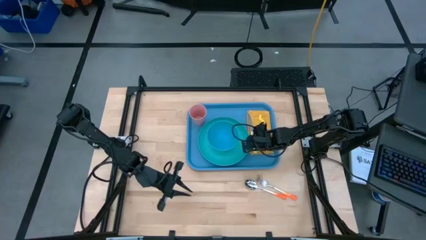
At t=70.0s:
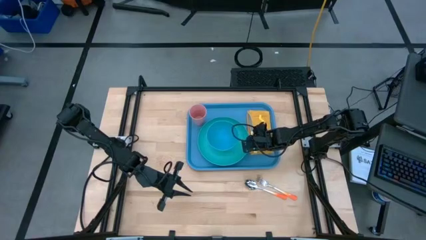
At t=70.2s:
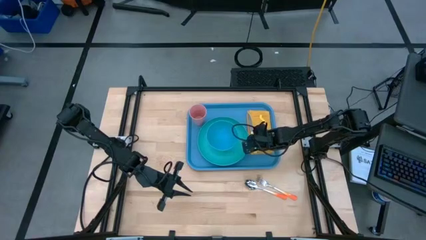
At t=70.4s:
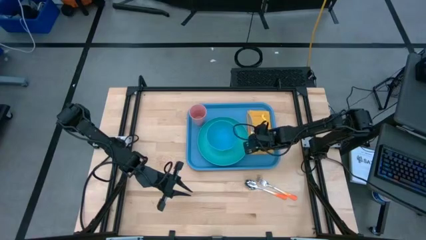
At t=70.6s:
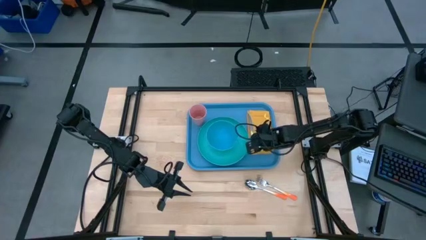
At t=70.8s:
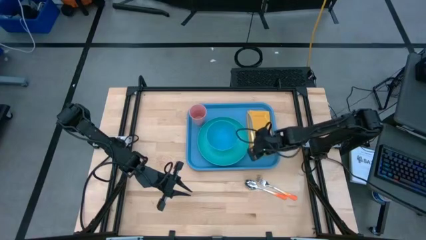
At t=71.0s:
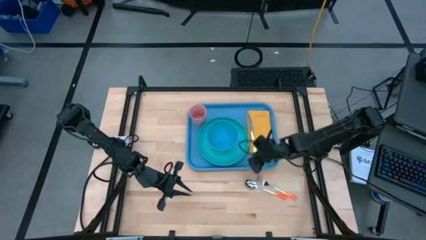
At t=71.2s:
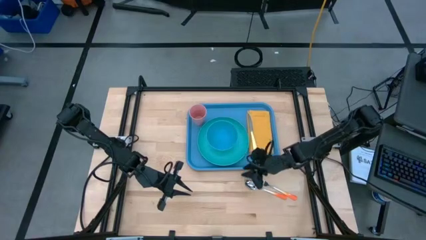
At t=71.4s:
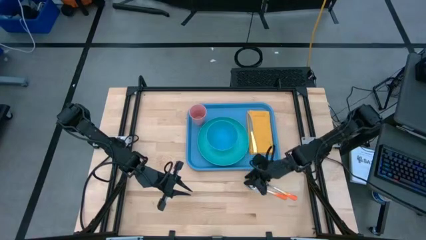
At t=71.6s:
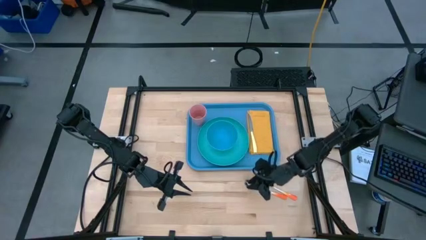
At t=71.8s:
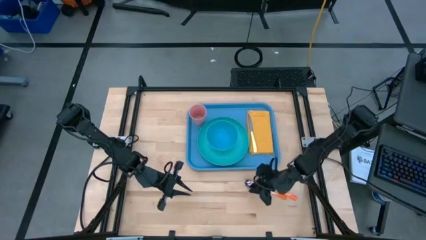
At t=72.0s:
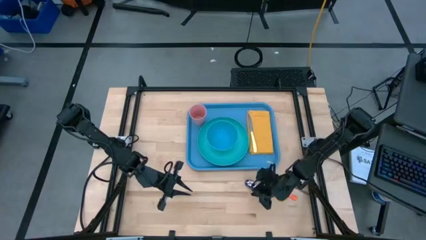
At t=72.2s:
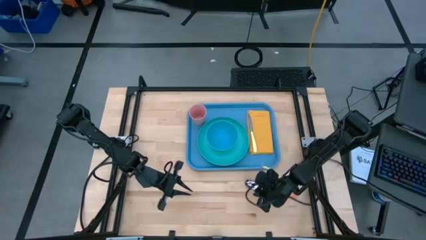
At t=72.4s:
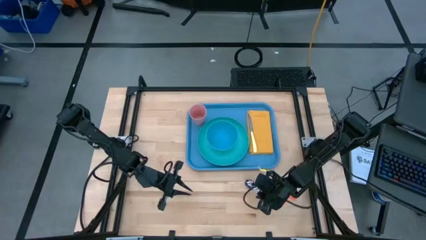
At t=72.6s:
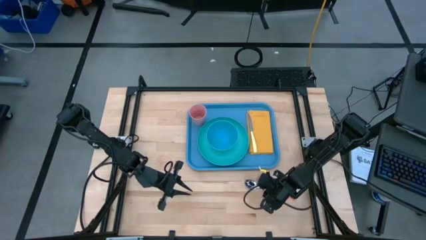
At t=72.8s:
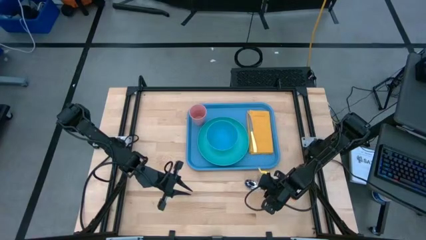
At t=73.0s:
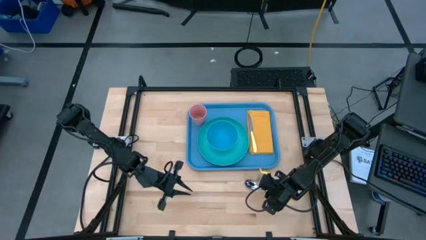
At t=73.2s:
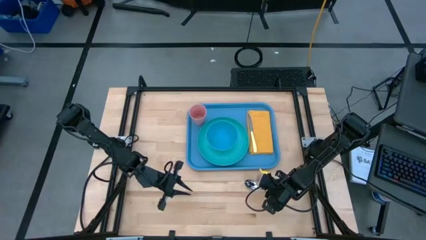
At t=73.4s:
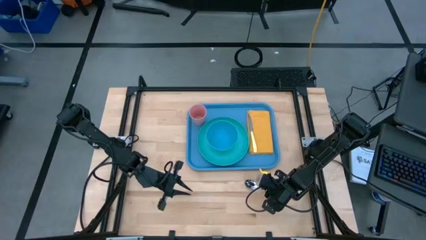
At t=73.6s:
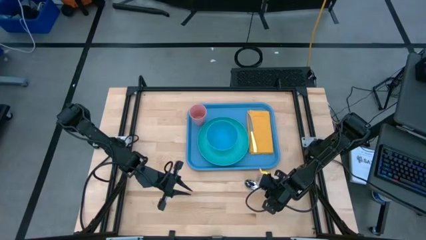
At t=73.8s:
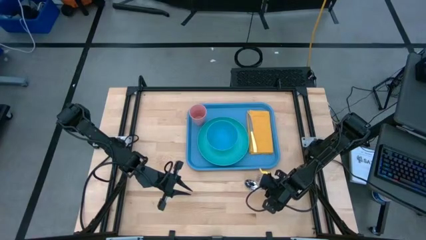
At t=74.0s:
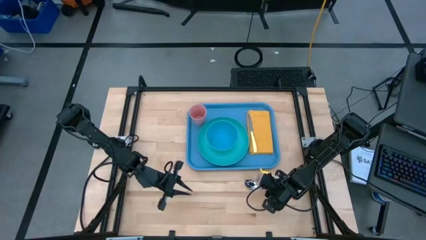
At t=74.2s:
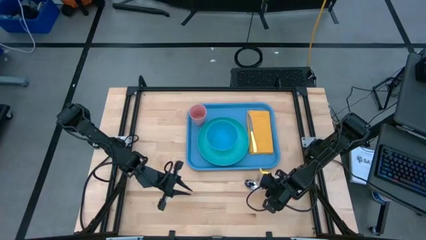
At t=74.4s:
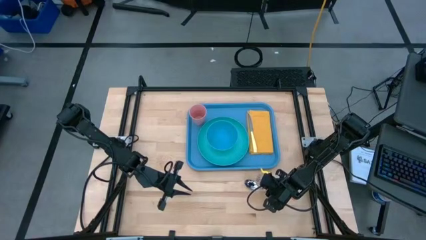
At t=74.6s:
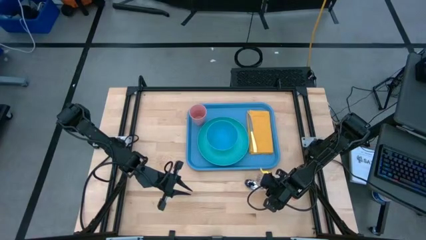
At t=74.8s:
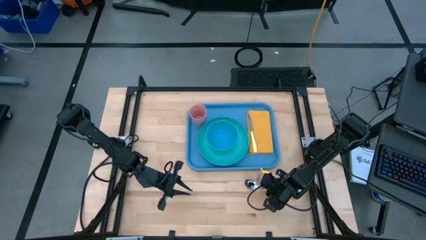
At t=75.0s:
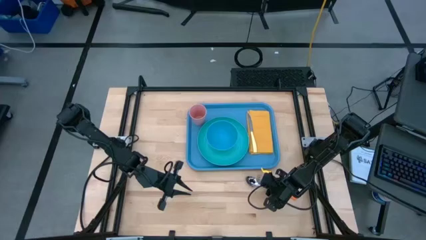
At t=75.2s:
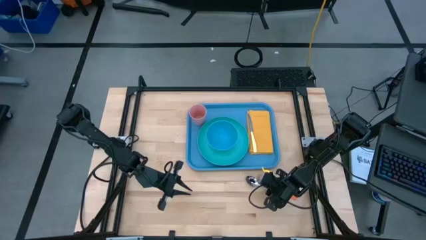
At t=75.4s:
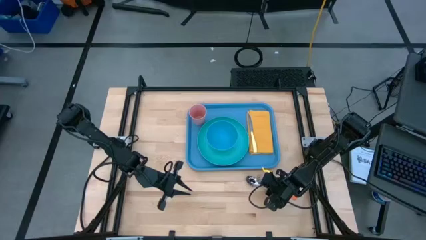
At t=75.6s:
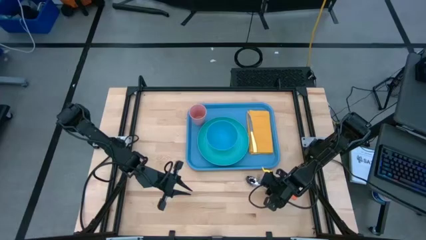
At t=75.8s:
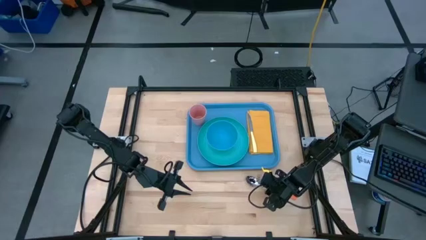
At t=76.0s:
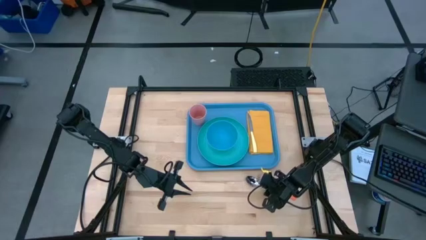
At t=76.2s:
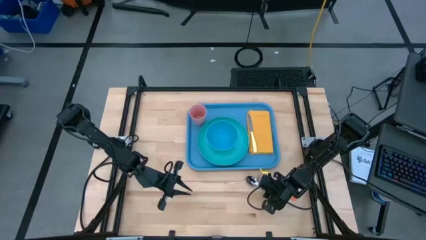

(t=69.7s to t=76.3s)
Task: Set up tray
Put the orange spoon on top of the yellow napkin to the right of the yellow knife

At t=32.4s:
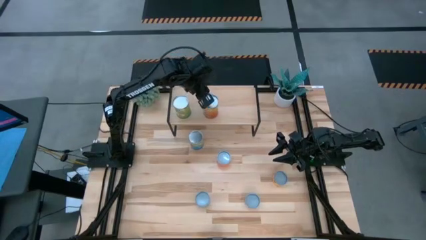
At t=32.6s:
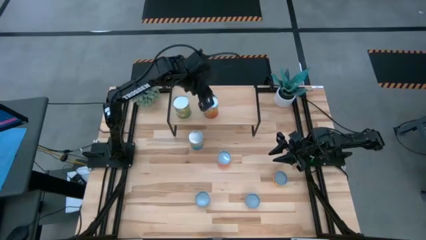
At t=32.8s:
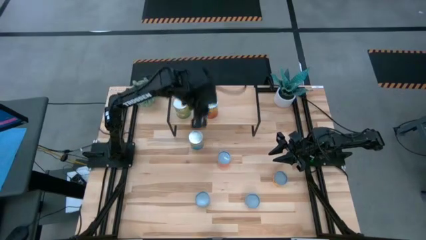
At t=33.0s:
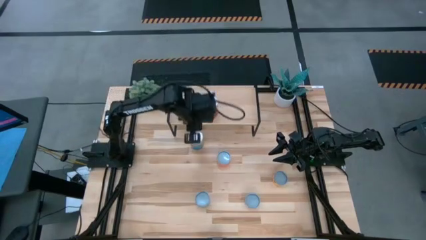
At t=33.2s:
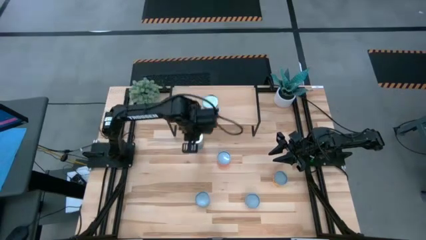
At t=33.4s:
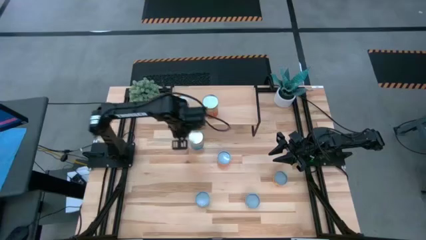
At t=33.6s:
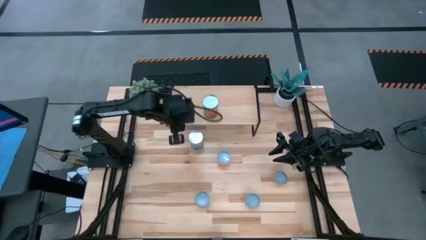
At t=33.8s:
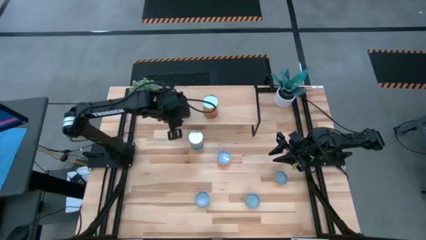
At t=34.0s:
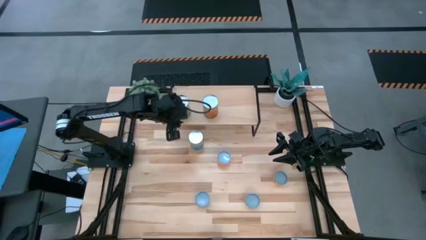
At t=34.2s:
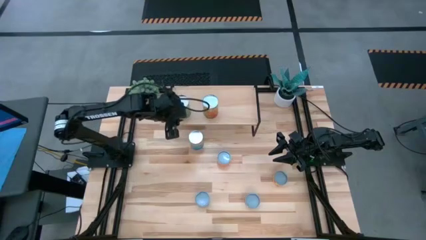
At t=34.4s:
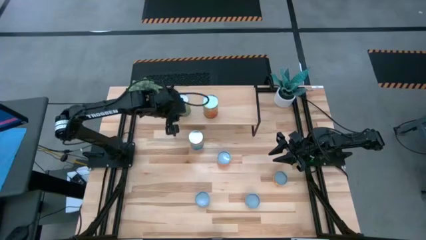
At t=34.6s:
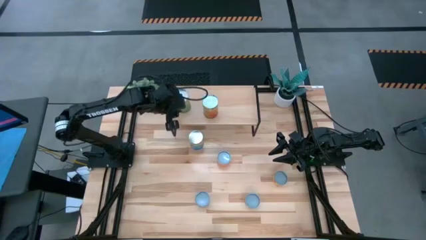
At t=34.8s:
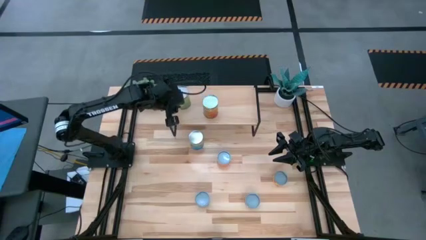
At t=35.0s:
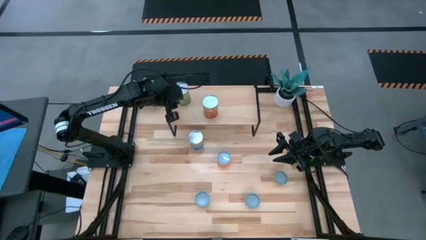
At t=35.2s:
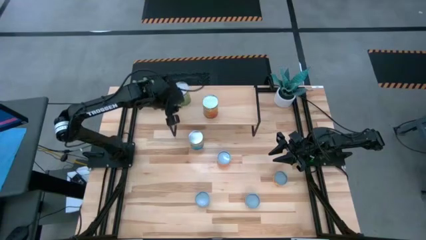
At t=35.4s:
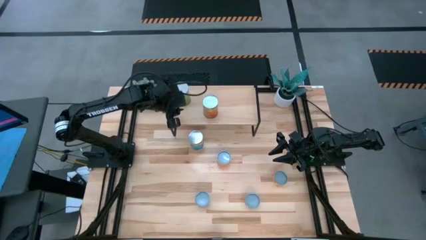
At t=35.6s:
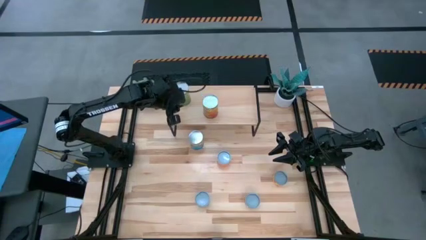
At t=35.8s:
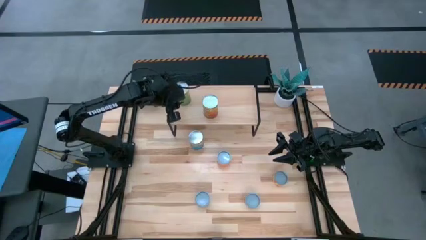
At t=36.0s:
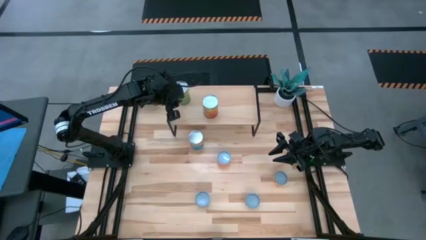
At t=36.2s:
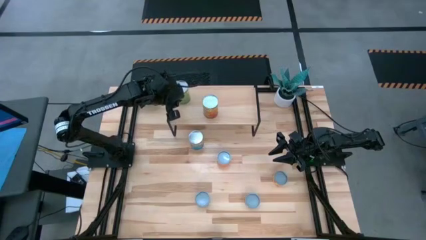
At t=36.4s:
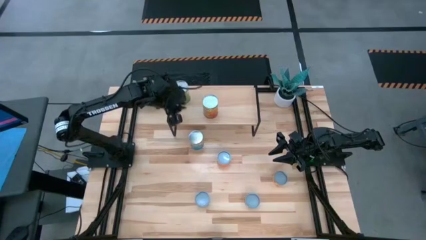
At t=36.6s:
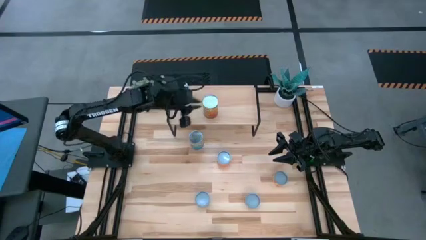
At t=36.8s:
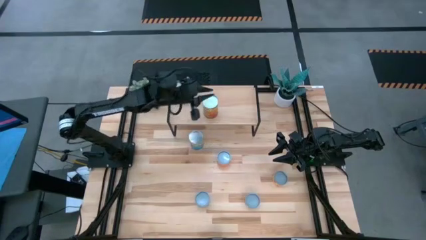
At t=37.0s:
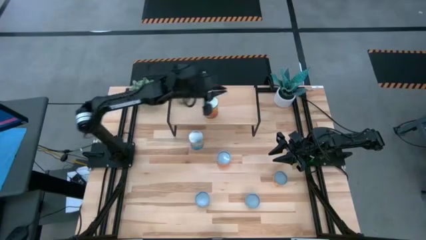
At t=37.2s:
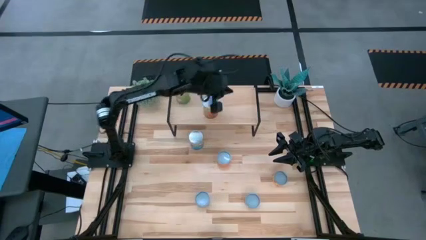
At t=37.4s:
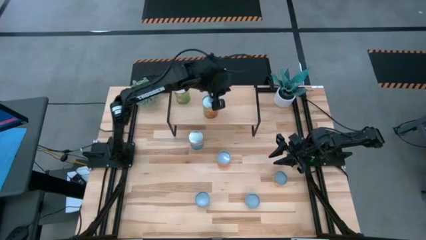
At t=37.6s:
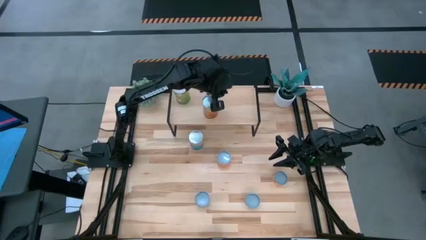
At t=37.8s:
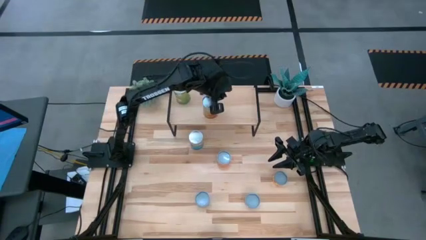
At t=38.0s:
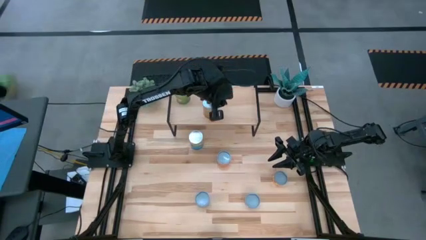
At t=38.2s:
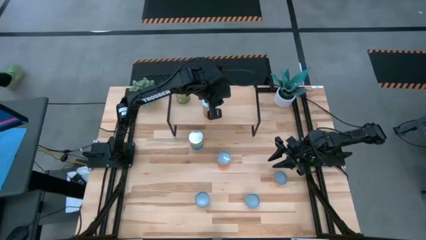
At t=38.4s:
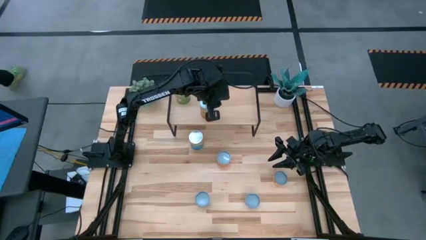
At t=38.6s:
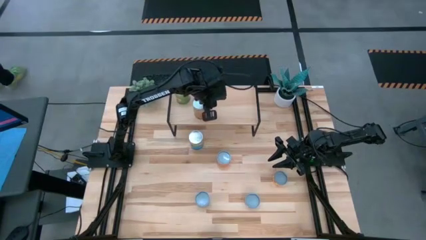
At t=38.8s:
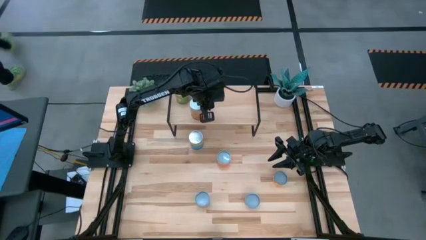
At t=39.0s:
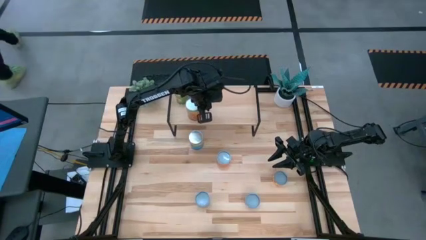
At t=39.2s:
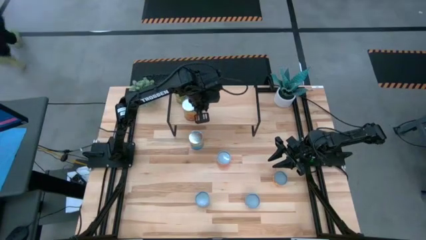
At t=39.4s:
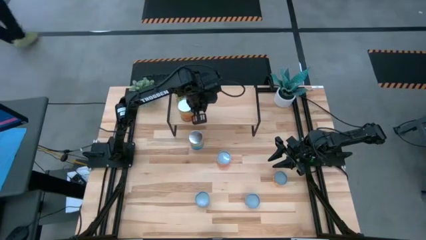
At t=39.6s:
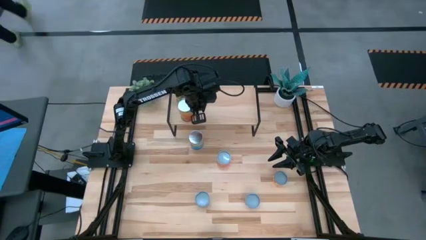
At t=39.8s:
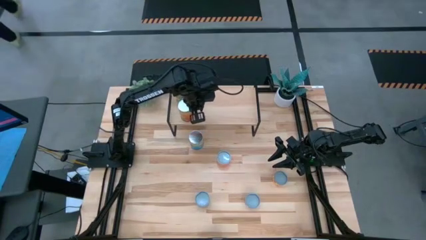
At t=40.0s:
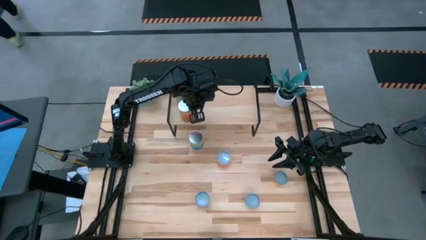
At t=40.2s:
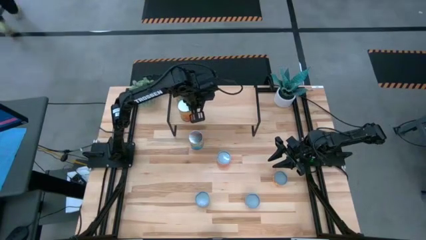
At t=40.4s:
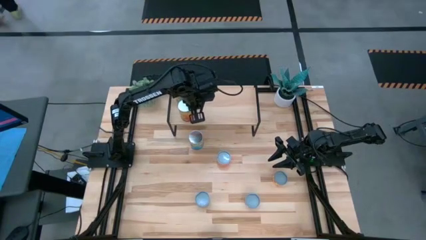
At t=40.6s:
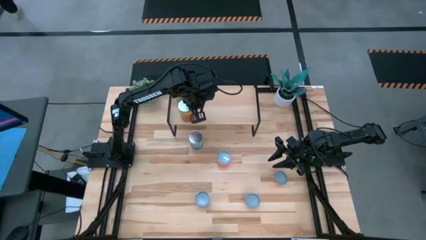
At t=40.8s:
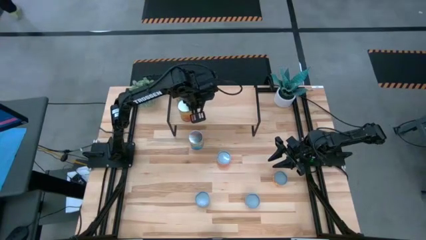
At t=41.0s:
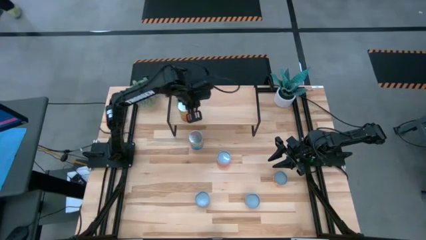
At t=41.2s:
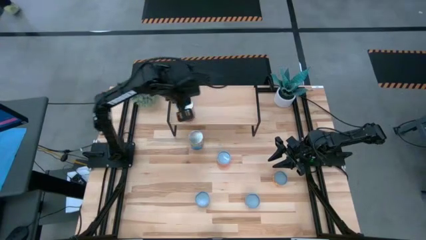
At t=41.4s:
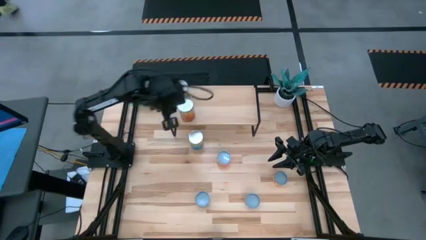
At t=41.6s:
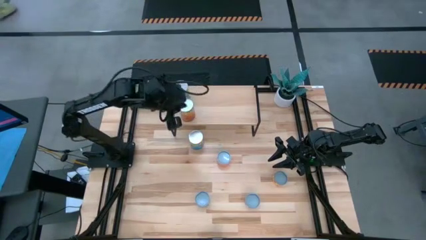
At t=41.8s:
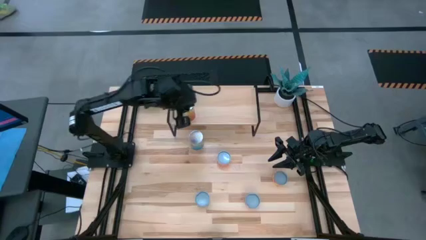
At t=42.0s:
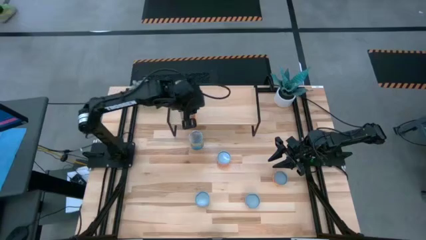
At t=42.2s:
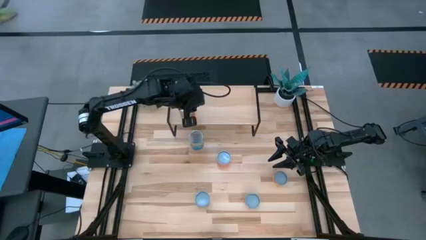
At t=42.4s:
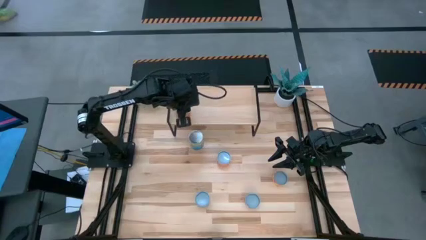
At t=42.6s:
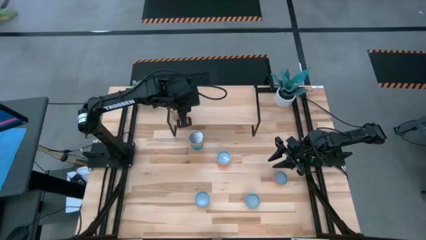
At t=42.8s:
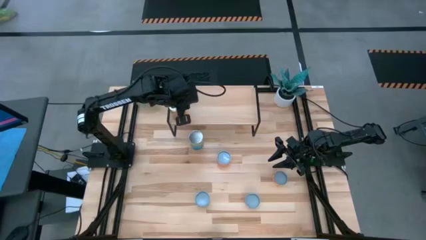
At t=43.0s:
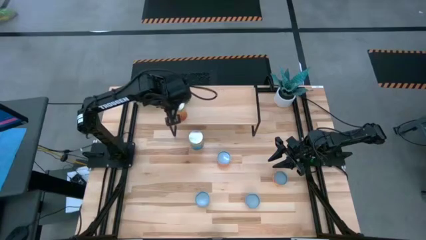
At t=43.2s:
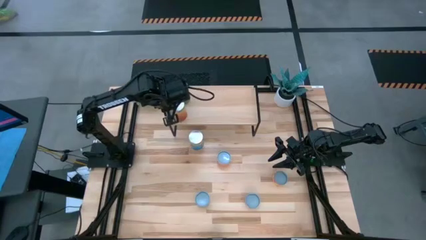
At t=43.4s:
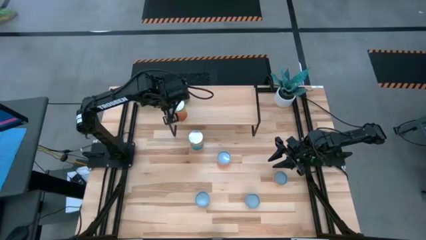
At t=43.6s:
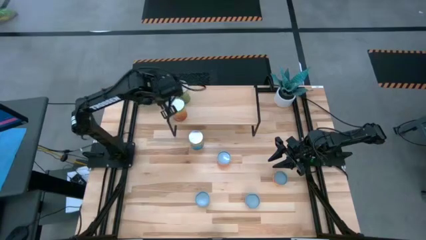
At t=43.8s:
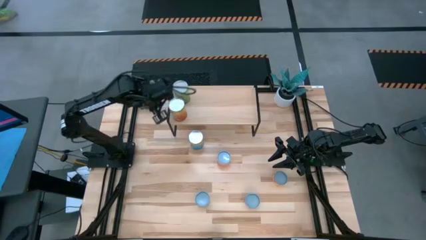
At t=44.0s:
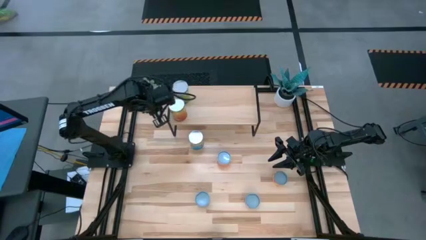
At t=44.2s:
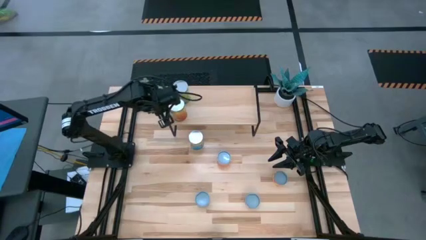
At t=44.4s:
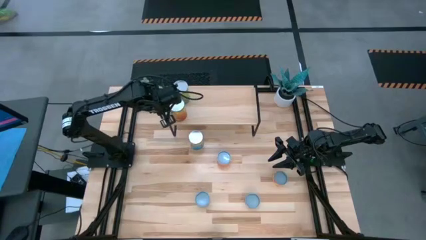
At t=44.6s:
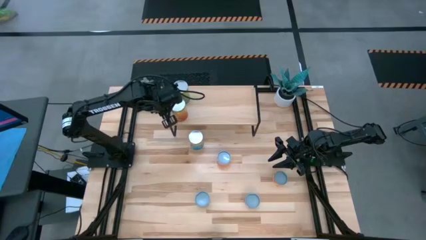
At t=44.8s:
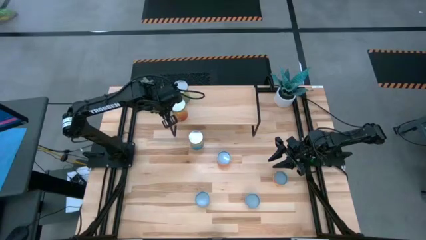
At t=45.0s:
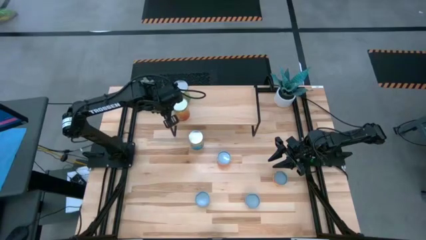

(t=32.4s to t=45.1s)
Task: Pick and place cans onto a shelf
Adjust the canned goods on the shelf
